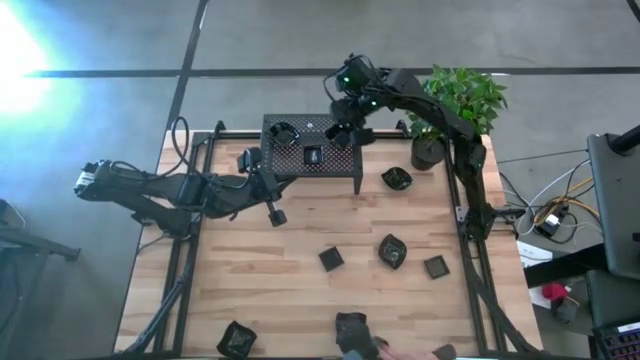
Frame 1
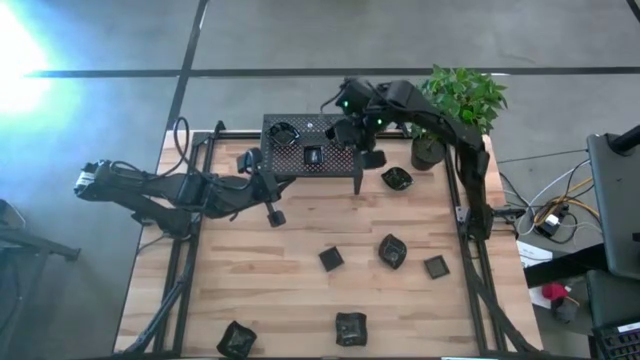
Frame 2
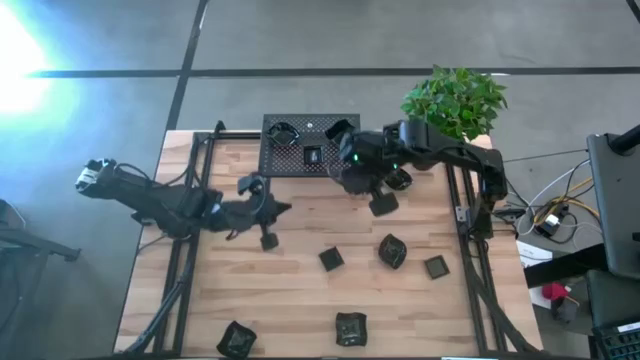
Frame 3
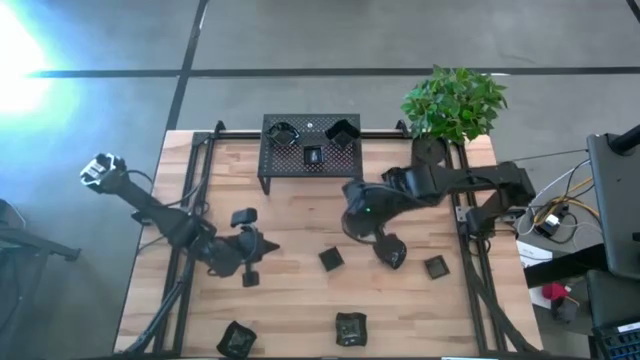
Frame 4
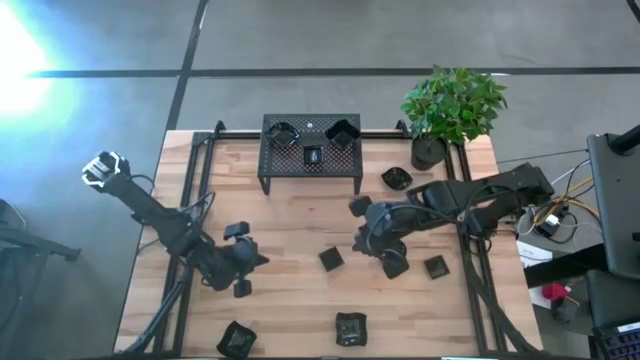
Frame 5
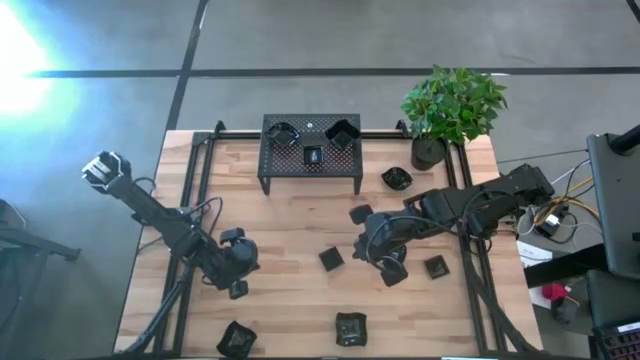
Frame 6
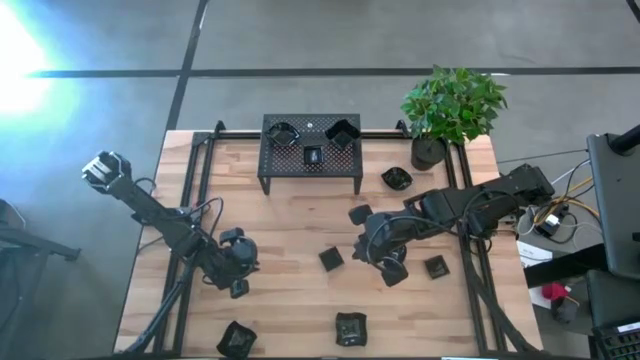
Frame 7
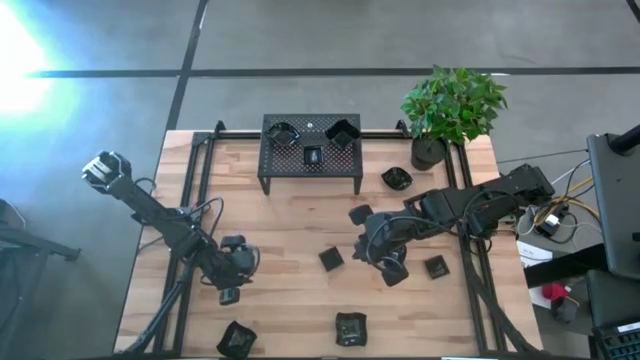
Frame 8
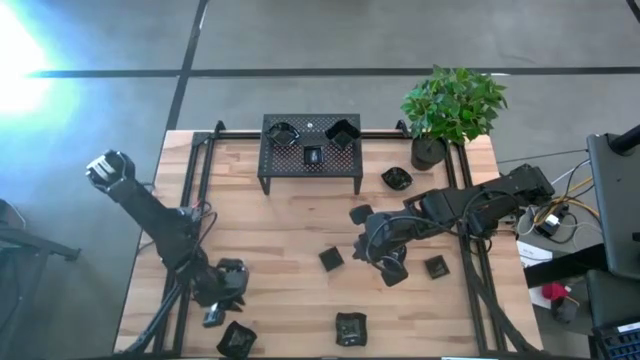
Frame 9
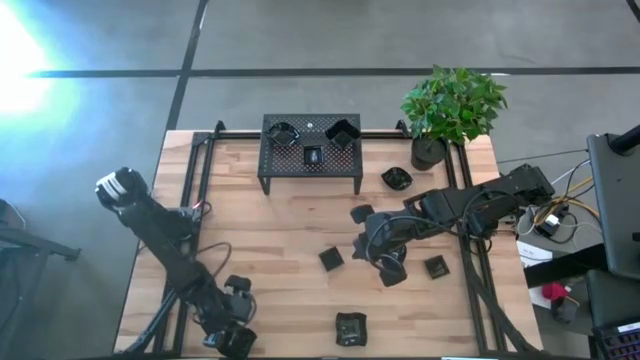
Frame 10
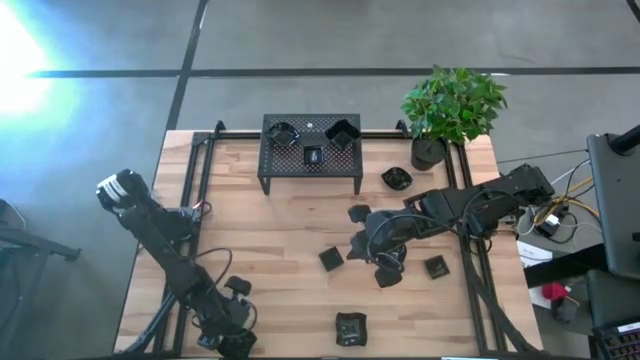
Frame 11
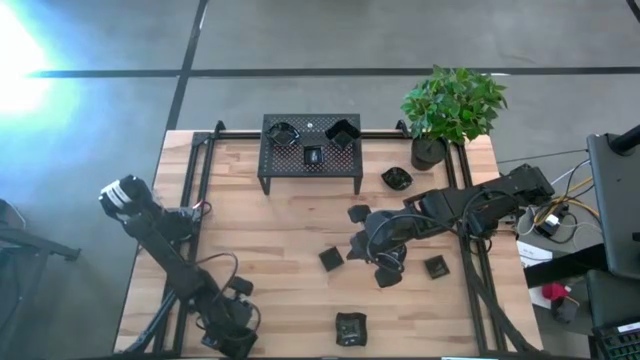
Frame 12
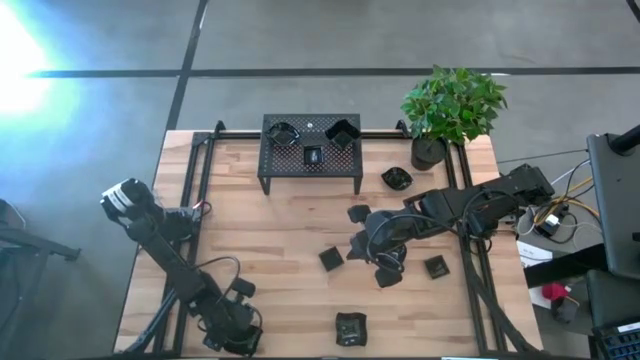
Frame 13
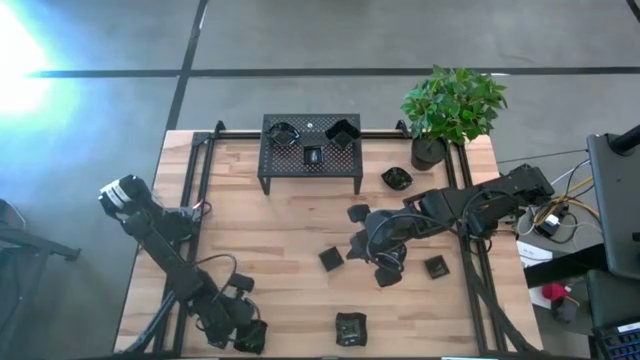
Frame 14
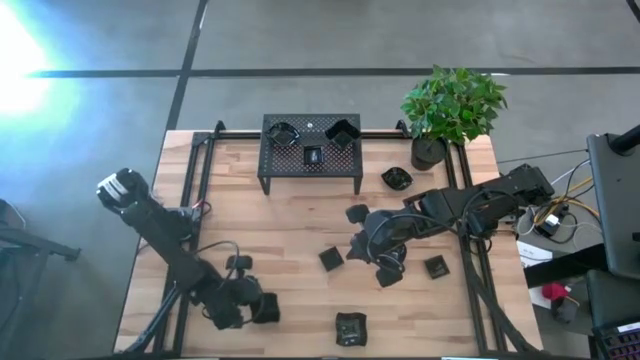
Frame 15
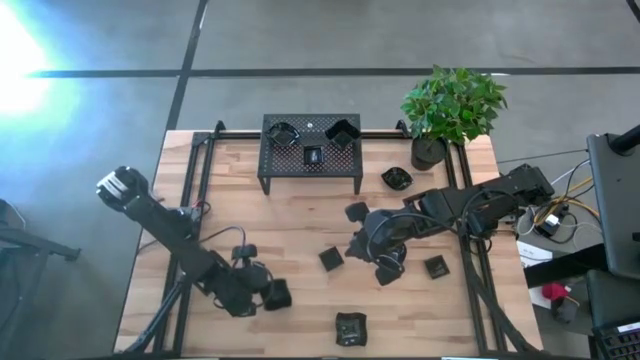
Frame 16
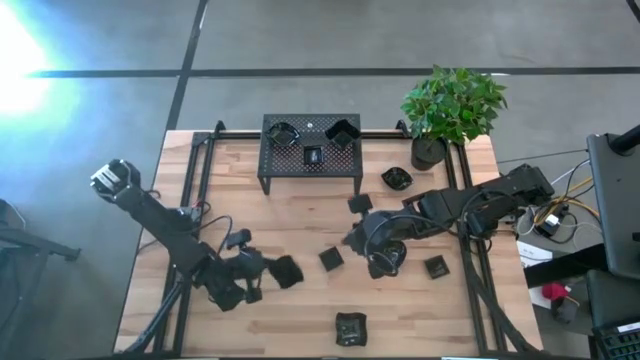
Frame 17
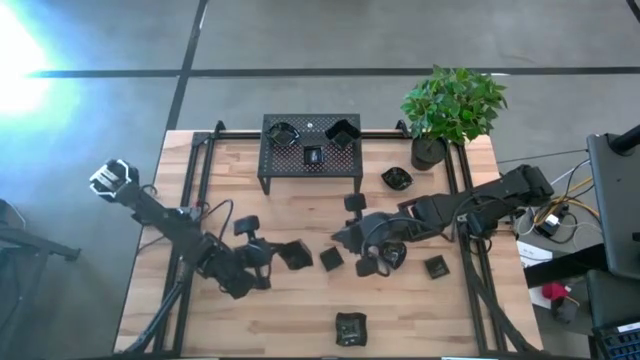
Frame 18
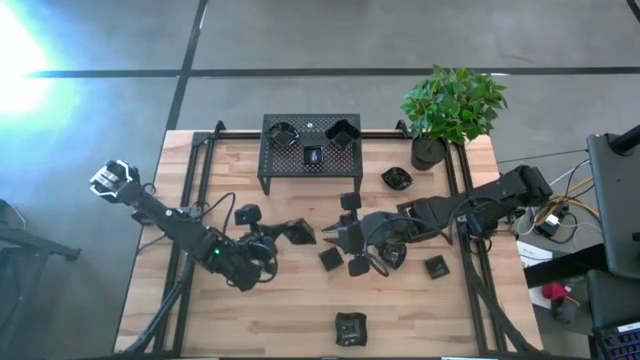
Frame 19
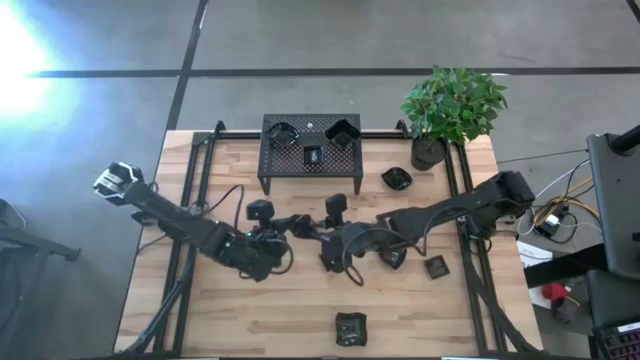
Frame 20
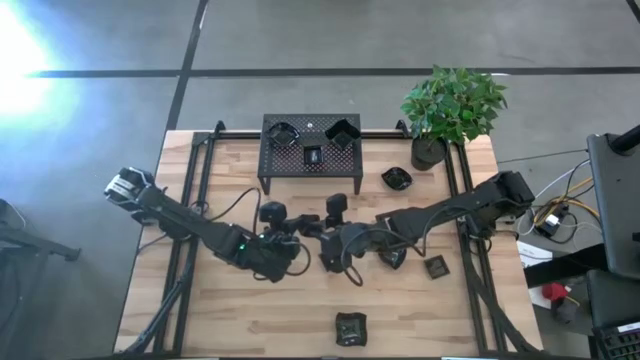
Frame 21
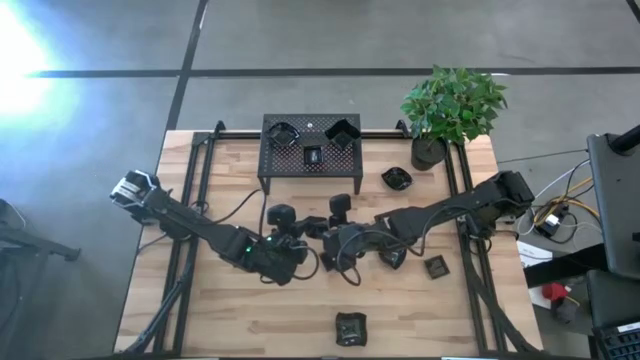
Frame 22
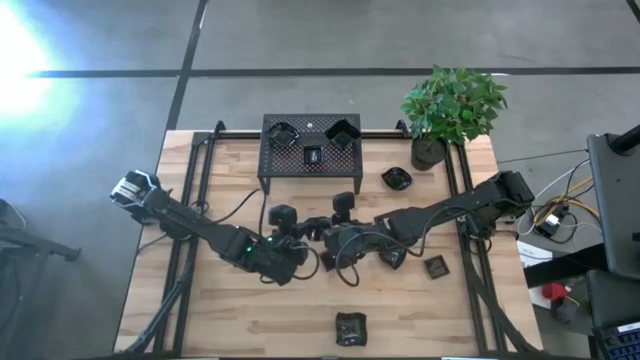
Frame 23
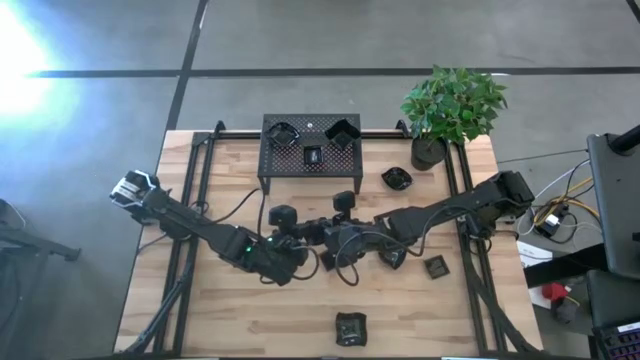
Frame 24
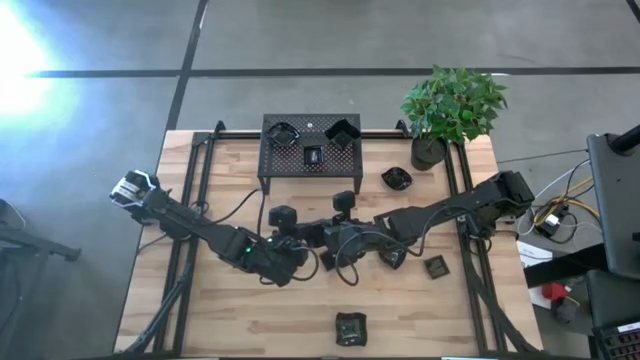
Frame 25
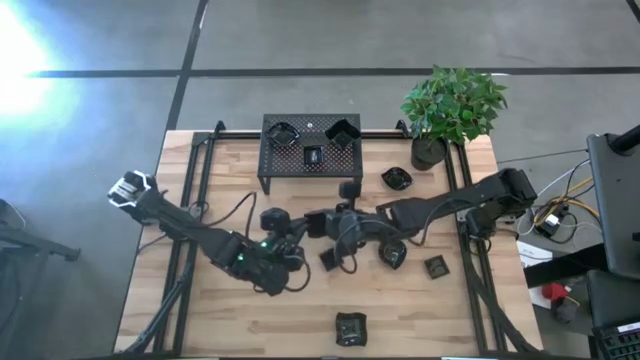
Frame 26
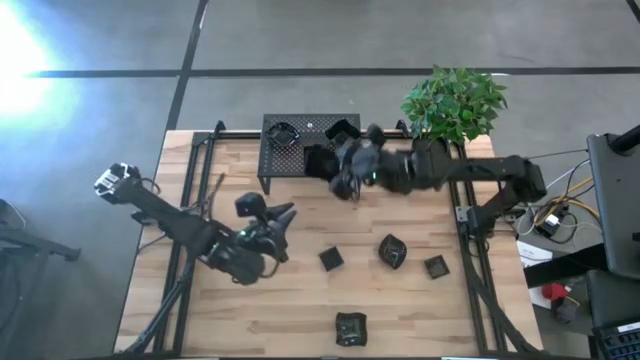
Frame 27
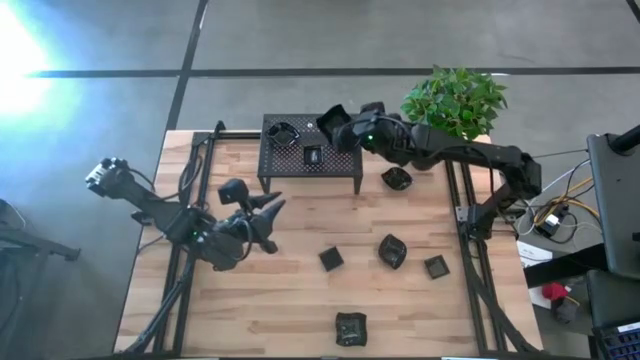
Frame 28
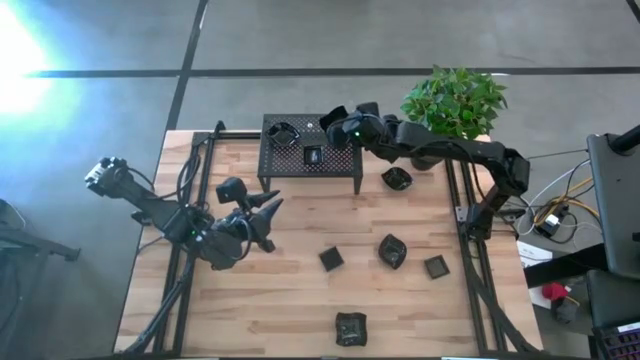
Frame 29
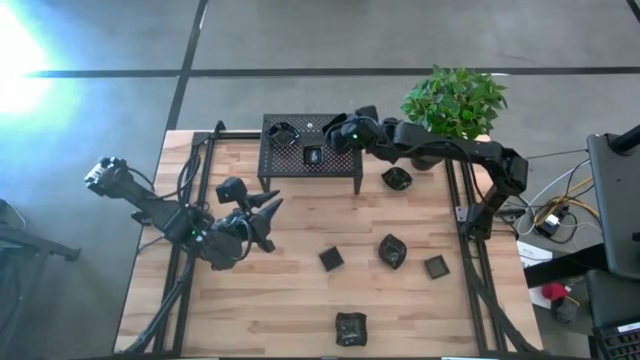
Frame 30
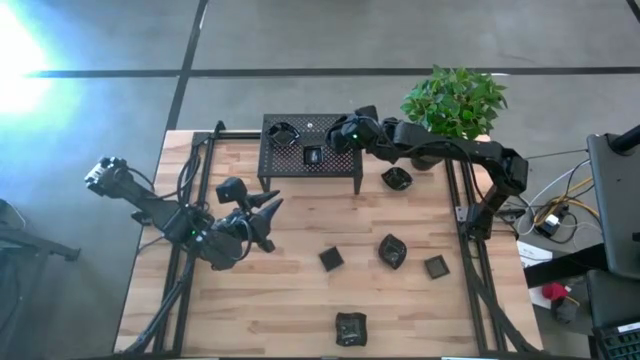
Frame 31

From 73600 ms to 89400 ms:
Task: Pick & Place Mini shaped plates
Stack the distorted square plate on top of the distorted square plates on the shelf
